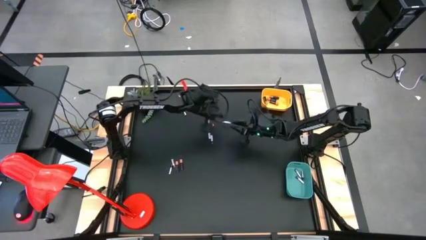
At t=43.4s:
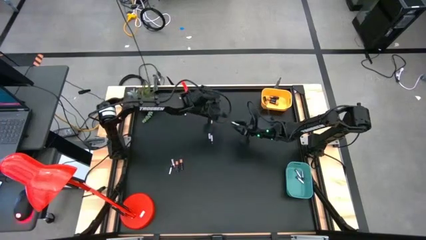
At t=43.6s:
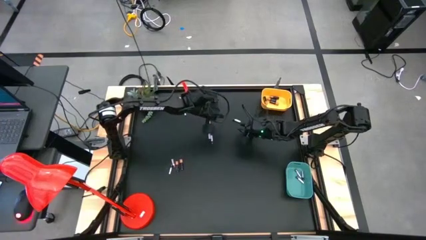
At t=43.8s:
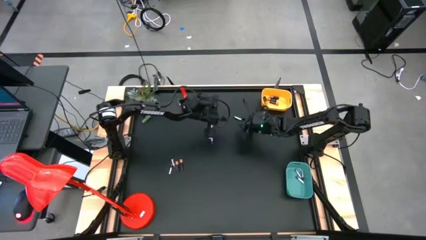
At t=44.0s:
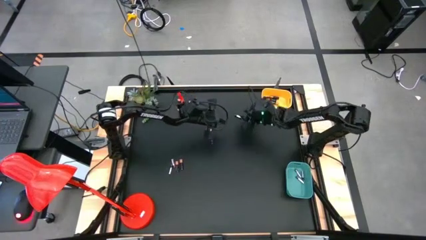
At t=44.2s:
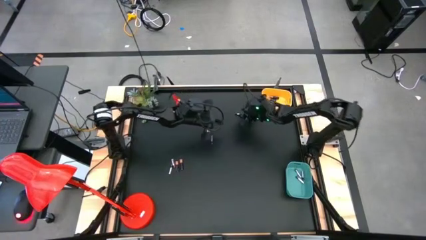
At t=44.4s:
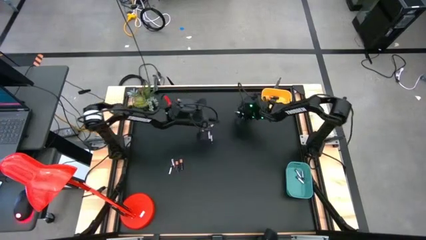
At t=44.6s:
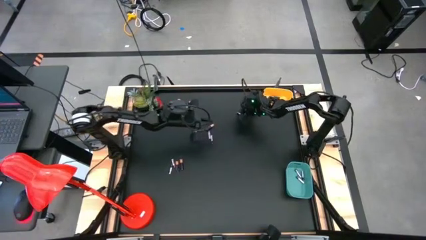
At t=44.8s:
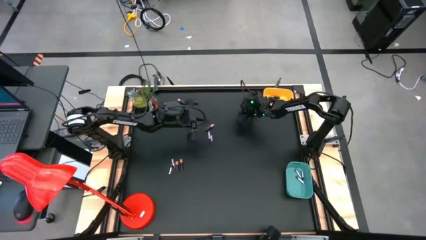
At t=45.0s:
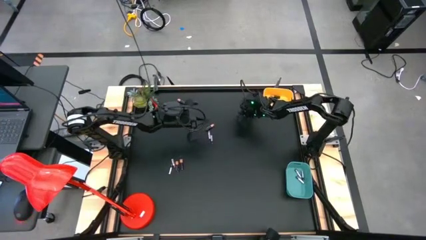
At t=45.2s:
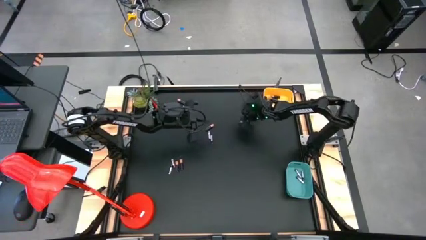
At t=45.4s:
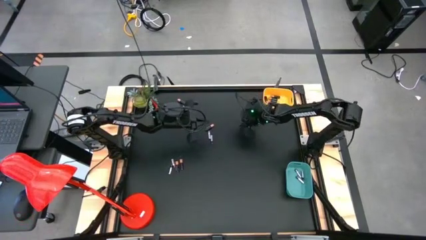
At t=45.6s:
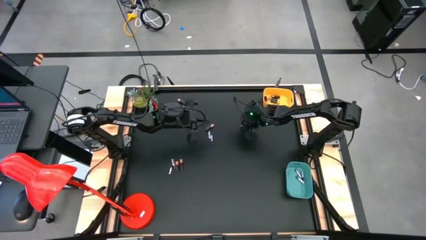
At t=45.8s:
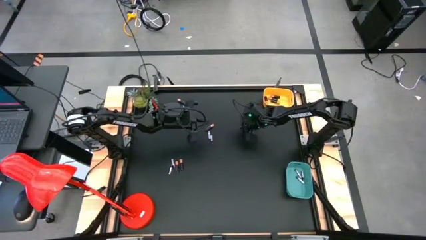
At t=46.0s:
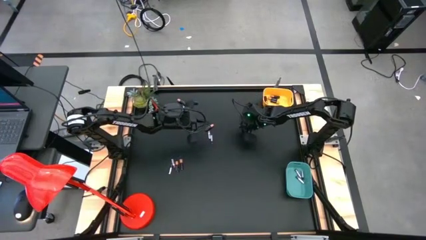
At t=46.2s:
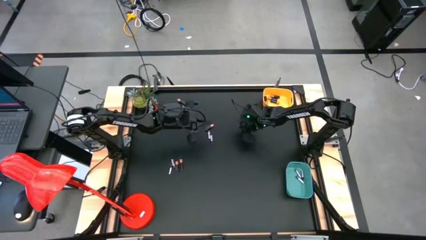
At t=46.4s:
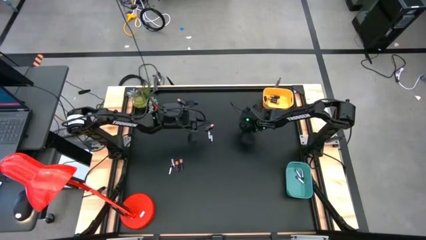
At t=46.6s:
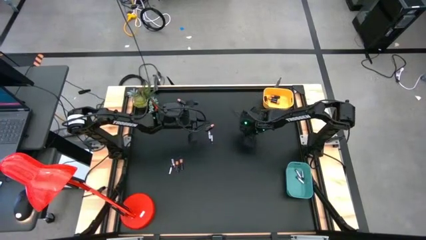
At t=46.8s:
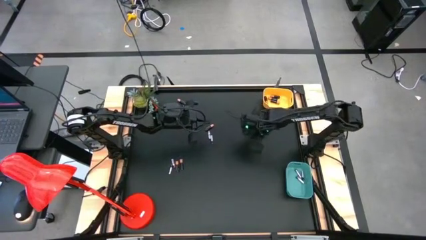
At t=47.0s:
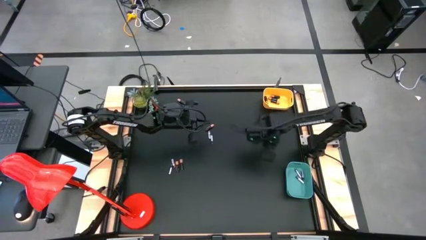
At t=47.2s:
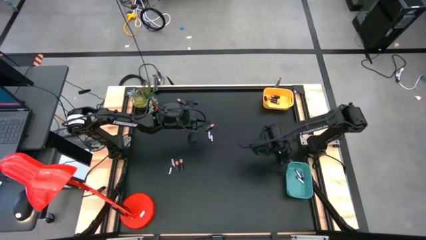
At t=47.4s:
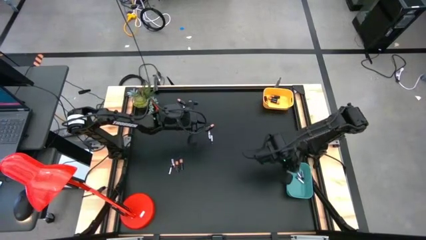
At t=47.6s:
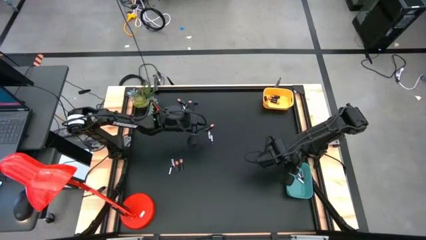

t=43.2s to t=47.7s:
Task: Sort batteries
Put the silver battery into the green bin

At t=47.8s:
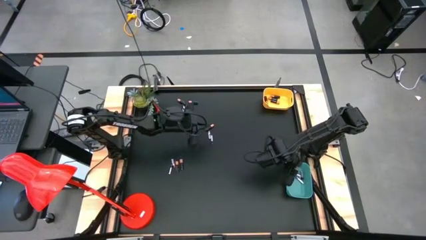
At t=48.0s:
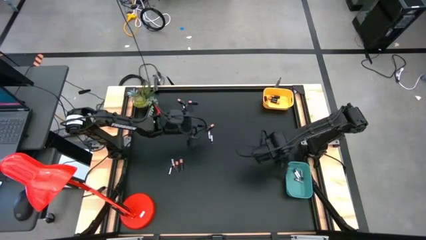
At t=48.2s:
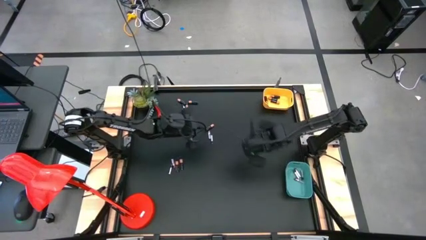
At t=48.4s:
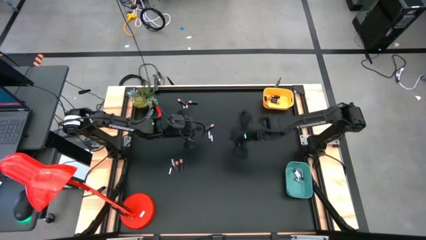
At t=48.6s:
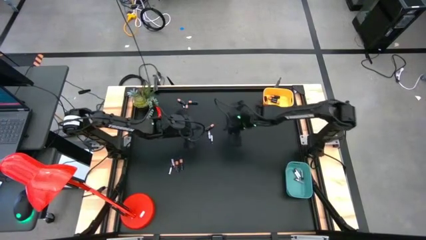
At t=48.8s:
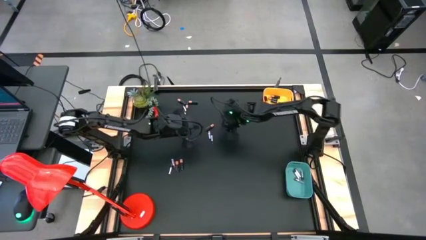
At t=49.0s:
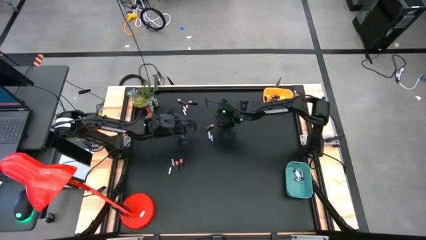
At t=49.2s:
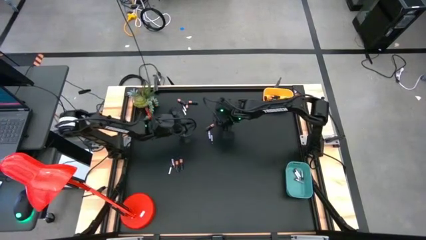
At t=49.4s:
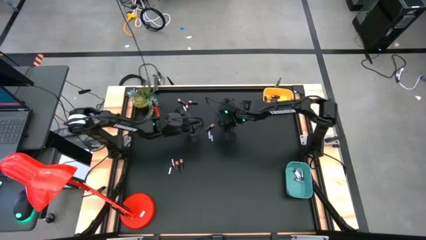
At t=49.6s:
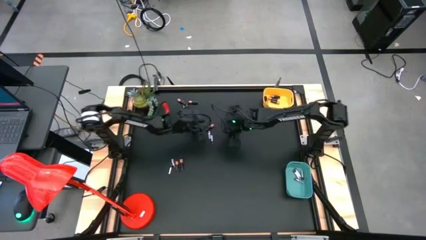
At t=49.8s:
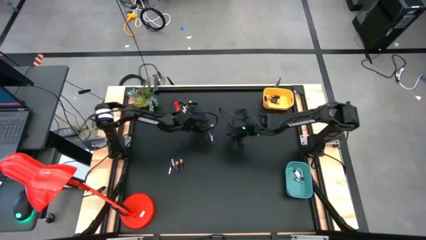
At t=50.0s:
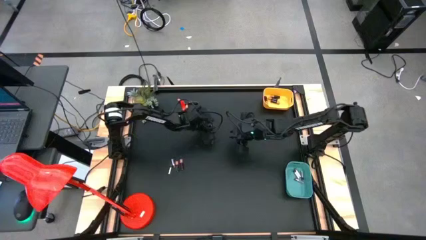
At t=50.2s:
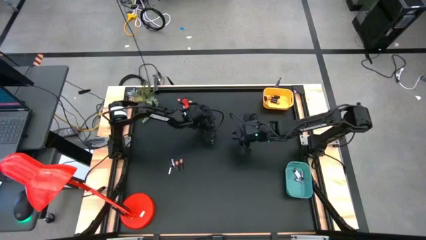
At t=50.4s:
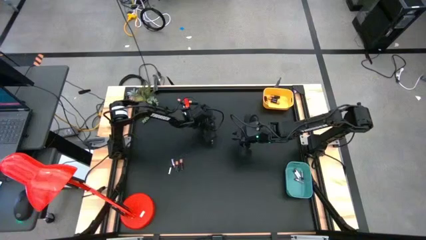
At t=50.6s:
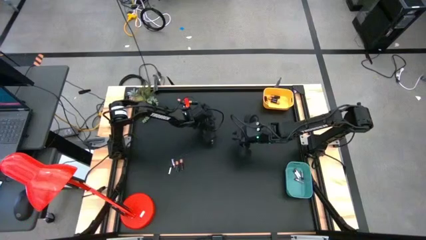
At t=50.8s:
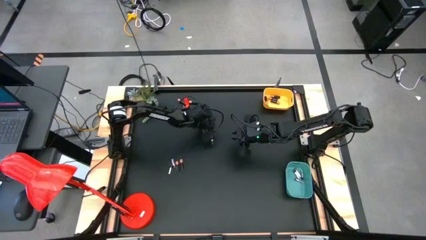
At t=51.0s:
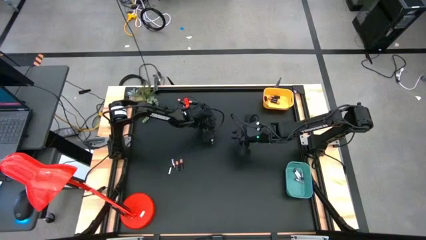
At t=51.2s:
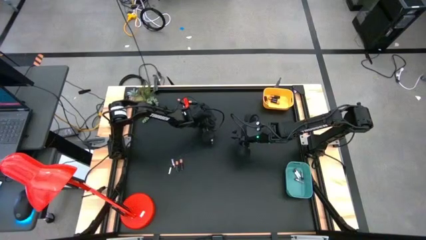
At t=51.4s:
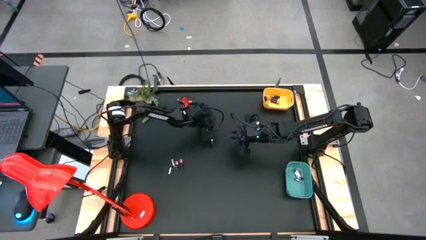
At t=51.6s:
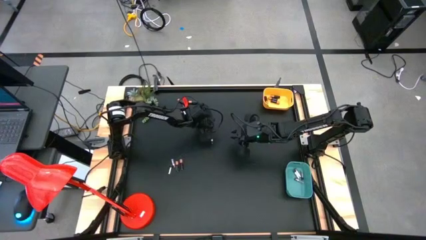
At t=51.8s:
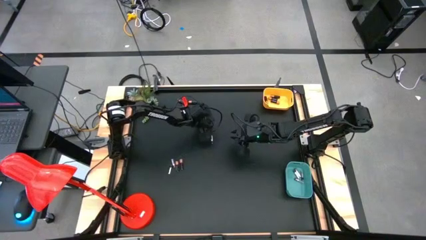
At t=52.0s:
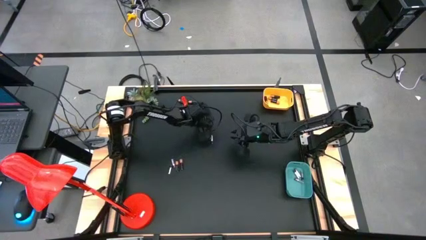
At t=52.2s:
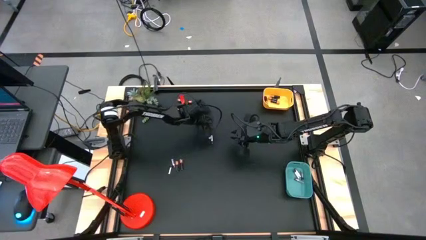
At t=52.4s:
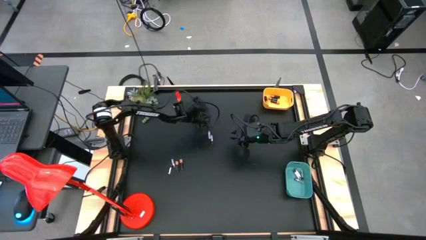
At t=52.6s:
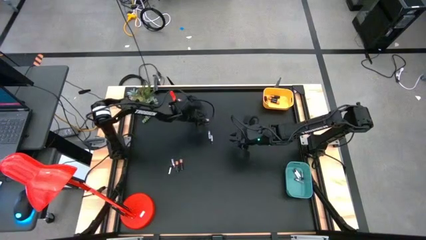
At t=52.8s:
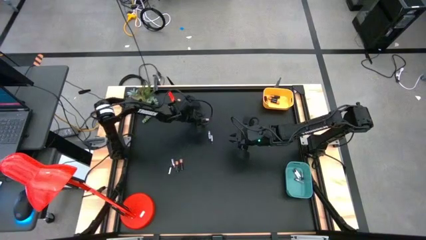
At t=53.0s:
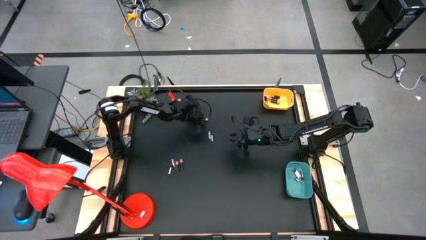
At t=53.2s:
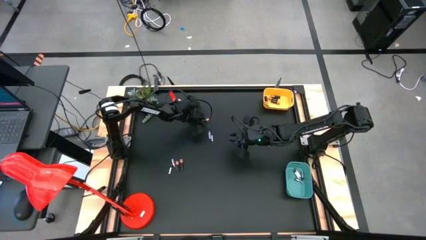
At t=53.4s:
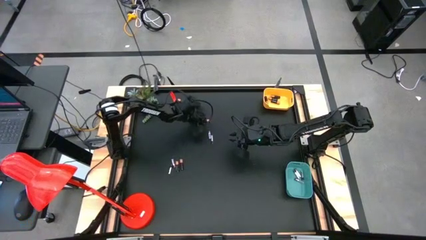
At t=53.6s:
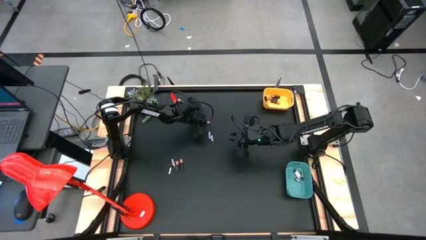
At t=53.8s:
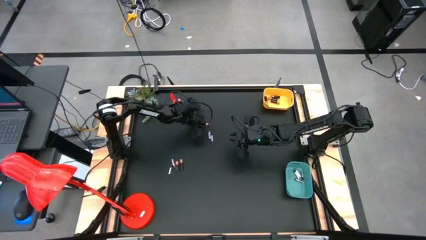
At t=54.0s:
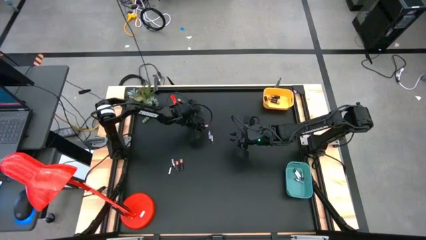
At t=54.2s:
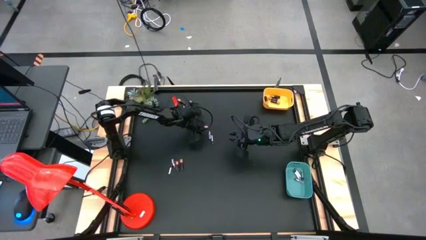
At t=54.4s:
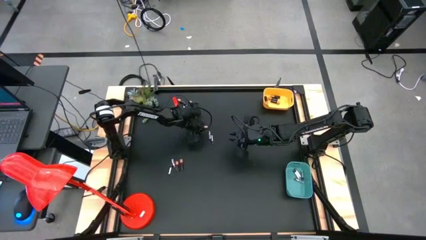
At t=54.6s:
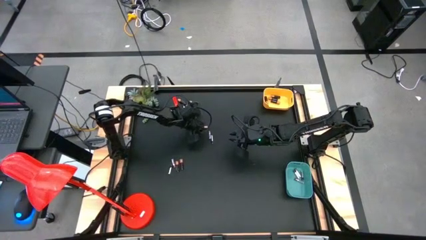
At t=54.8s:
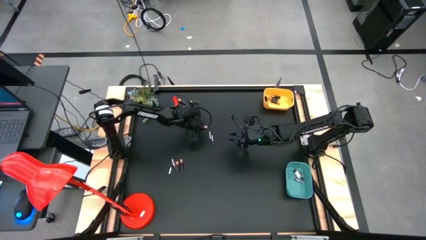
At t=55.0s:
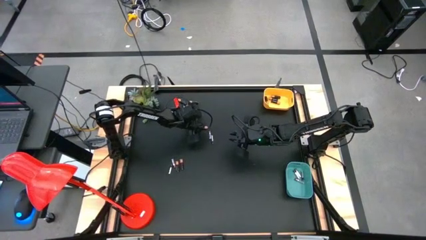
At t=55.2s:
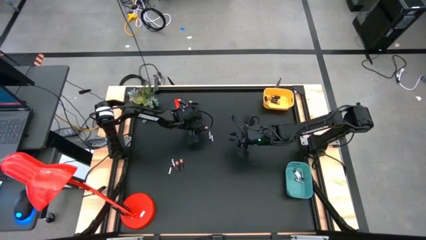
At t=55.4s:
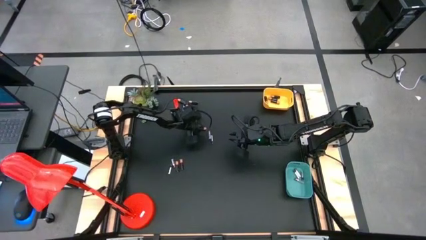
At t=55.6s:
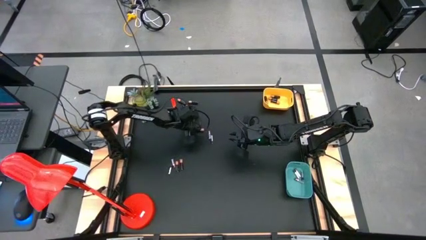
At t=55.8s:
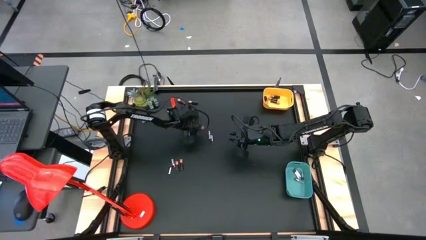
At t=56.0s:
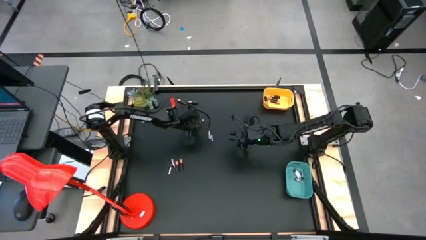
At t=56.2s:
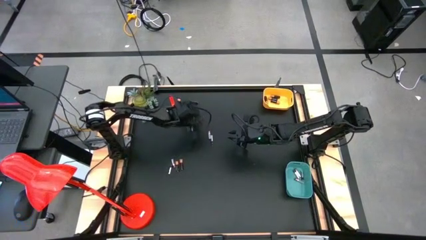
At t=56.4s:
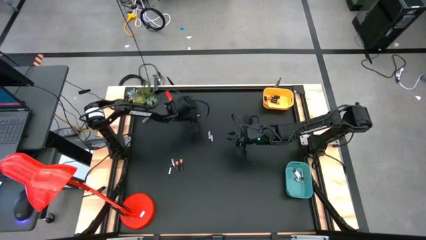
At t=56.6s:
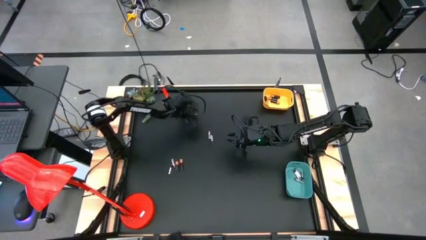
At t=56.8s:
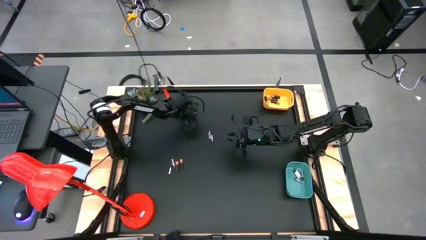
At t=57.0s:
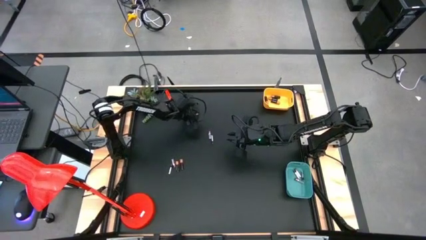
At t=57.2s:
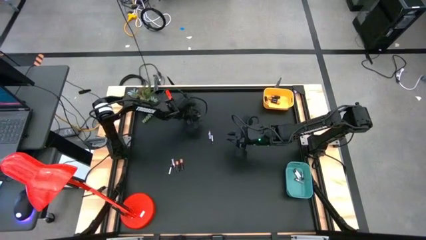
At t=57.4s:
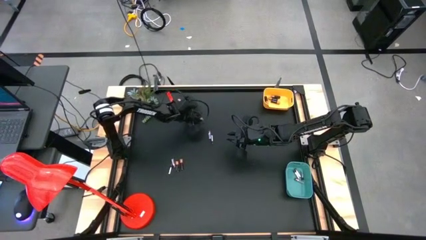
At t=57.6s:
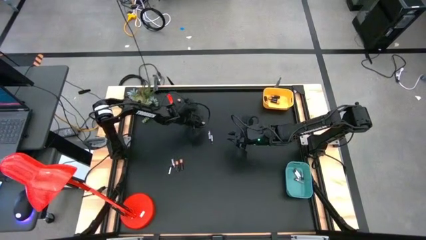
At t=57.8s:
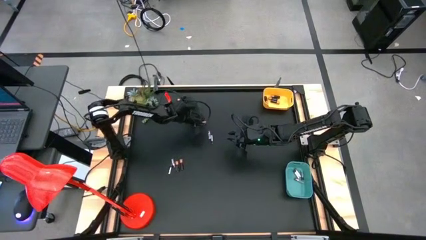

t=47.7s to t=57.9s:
Put the black battery into the yellow bin
